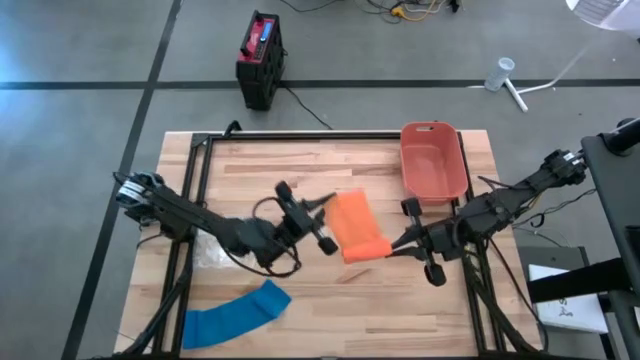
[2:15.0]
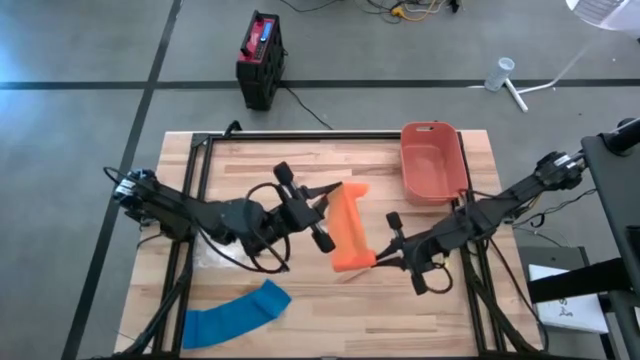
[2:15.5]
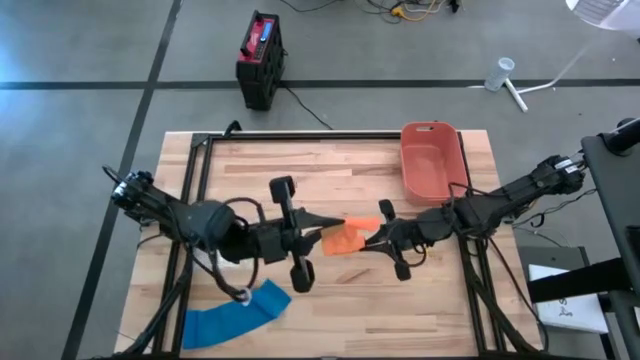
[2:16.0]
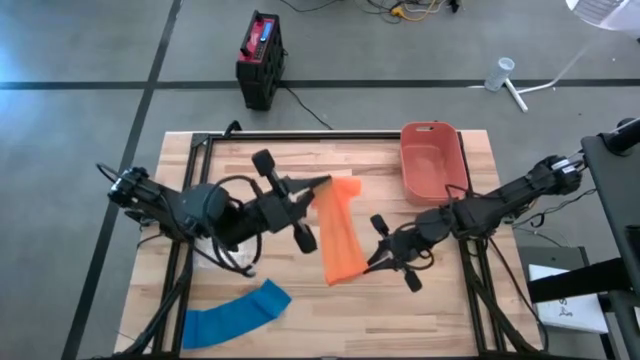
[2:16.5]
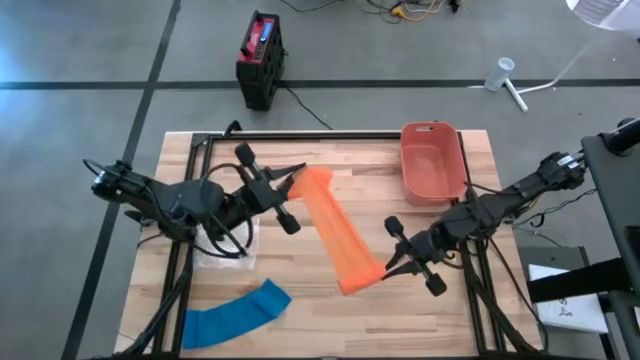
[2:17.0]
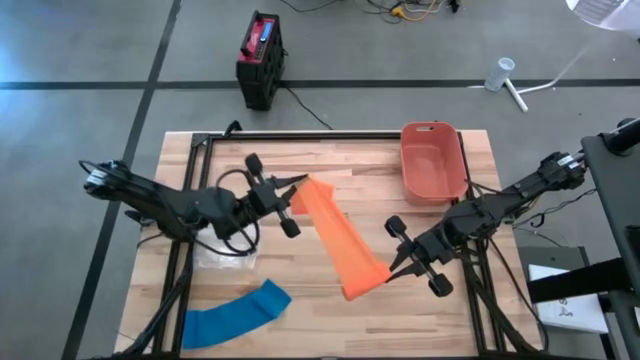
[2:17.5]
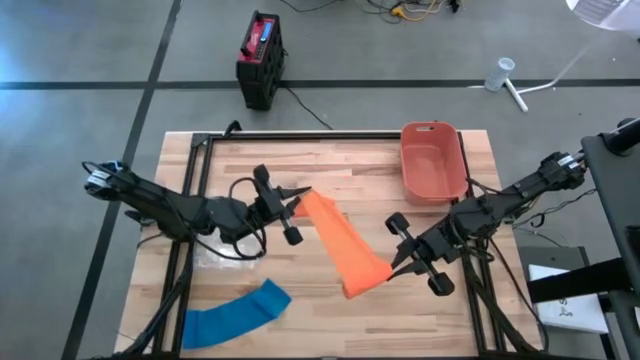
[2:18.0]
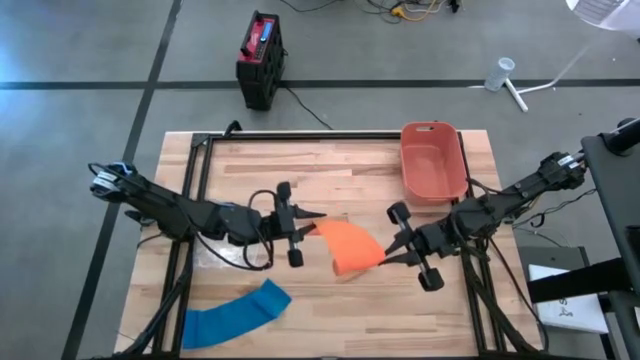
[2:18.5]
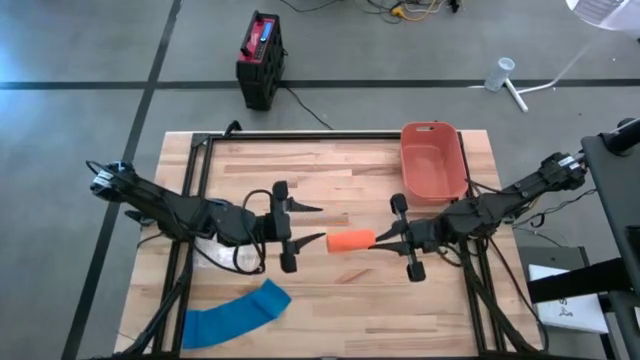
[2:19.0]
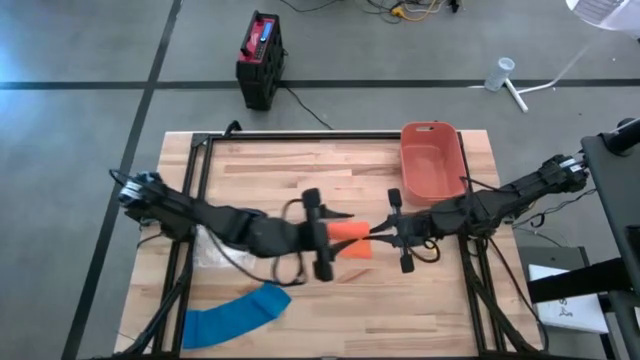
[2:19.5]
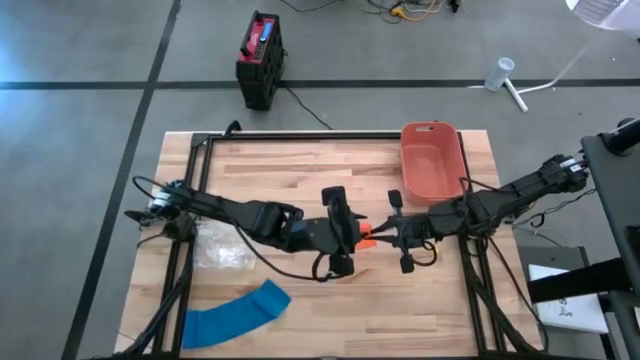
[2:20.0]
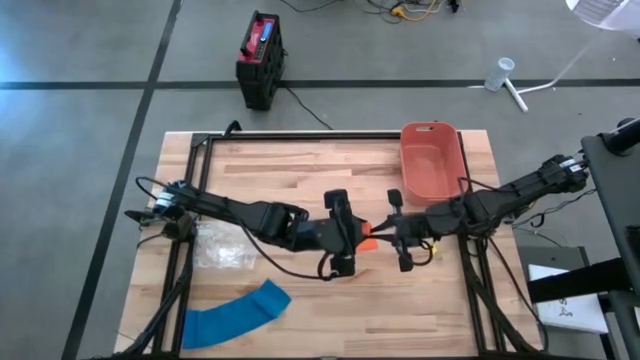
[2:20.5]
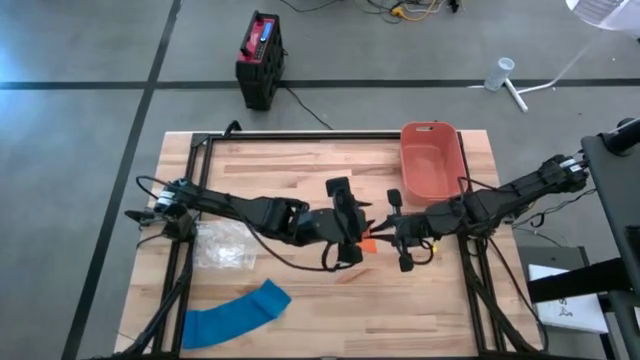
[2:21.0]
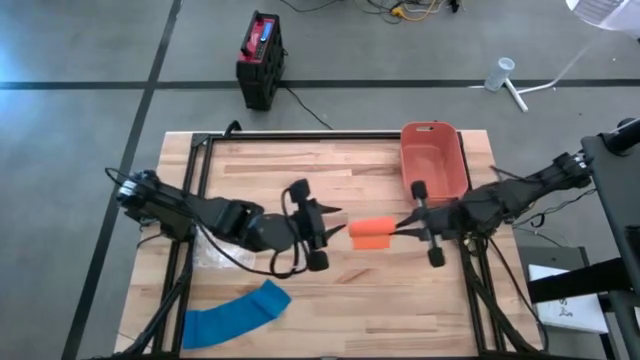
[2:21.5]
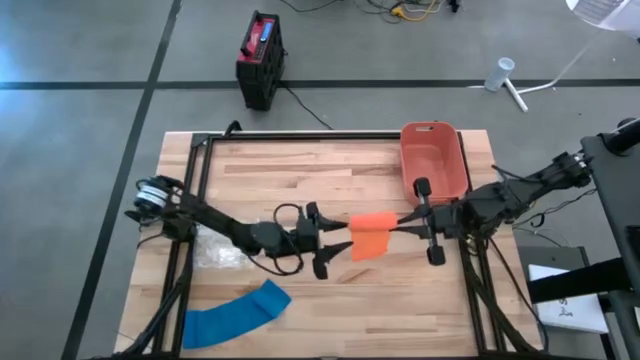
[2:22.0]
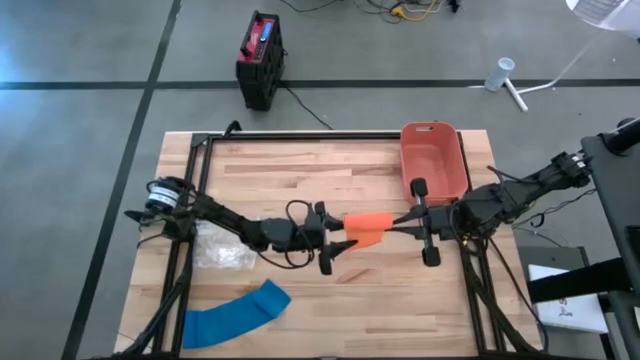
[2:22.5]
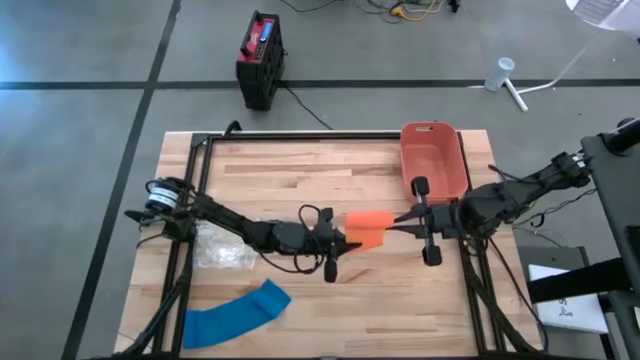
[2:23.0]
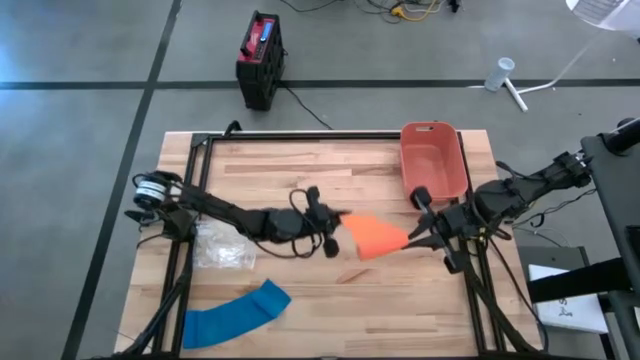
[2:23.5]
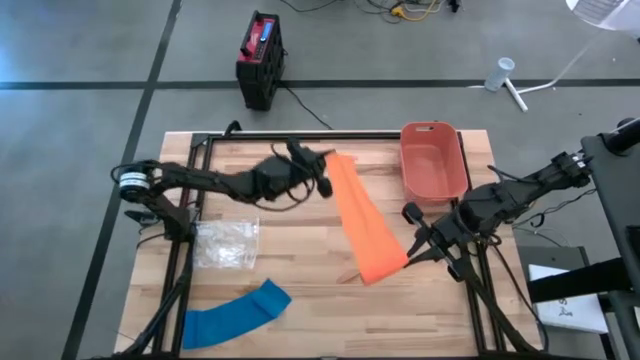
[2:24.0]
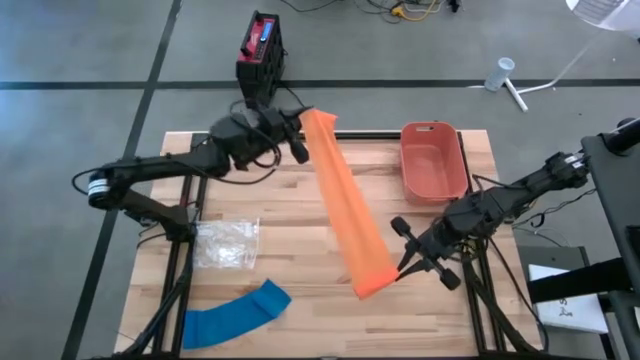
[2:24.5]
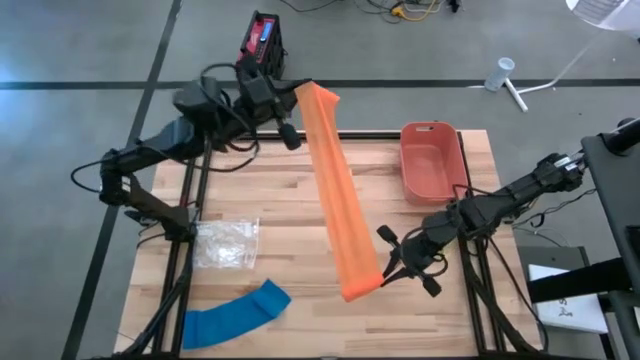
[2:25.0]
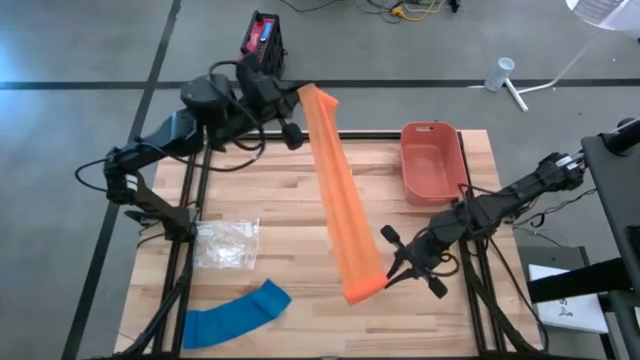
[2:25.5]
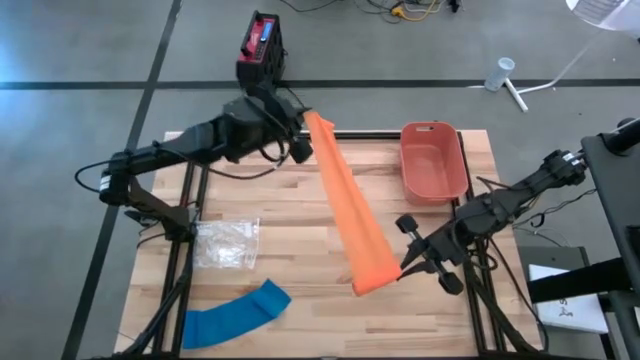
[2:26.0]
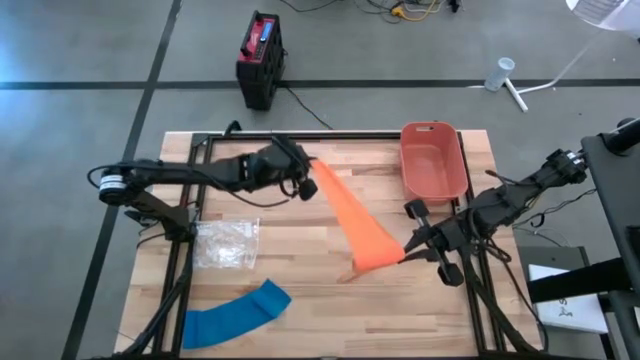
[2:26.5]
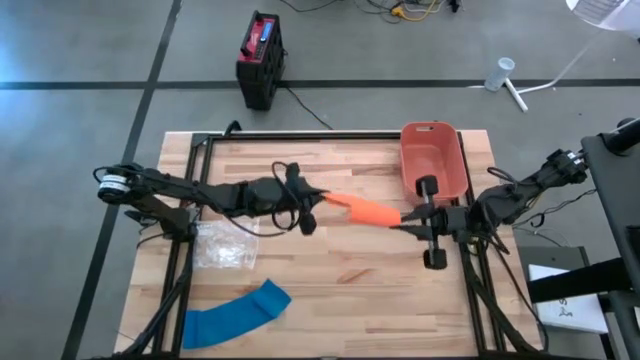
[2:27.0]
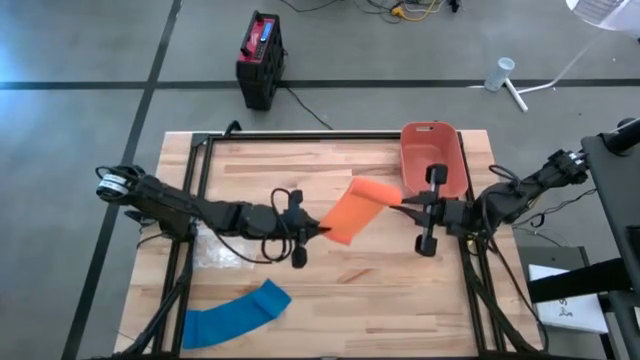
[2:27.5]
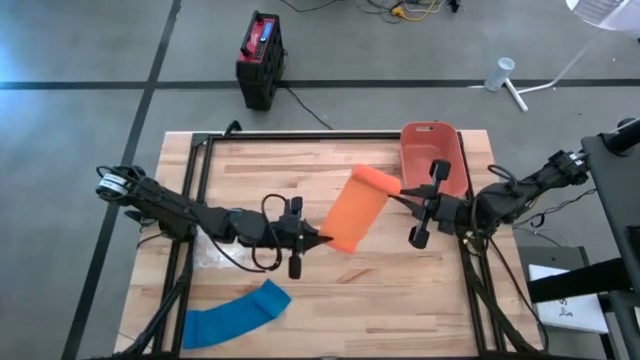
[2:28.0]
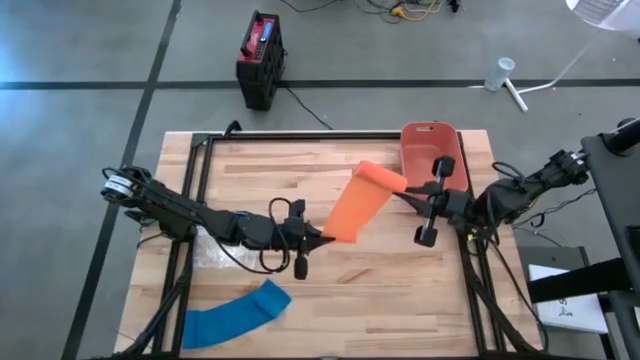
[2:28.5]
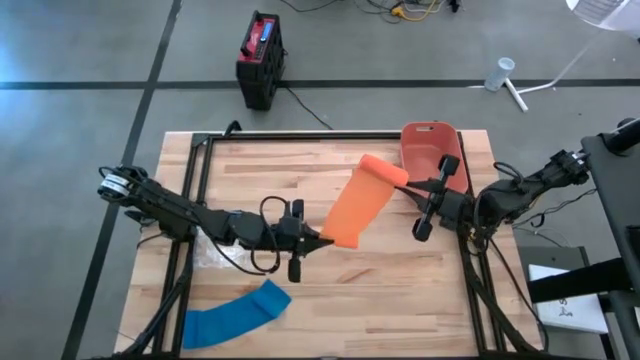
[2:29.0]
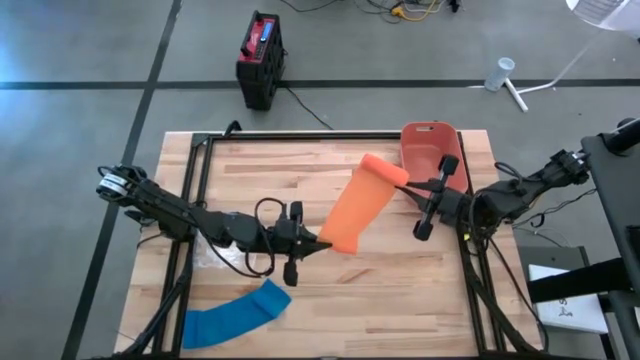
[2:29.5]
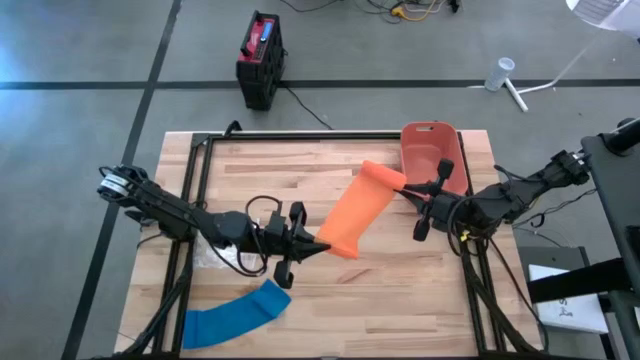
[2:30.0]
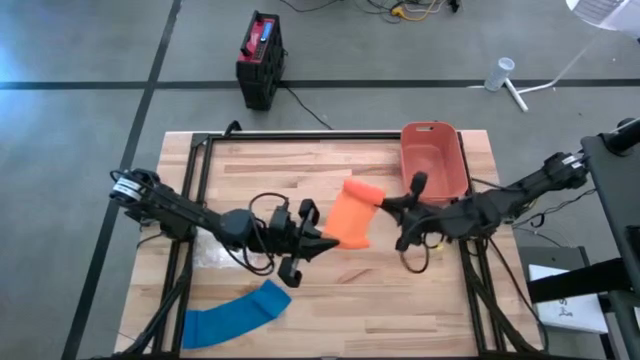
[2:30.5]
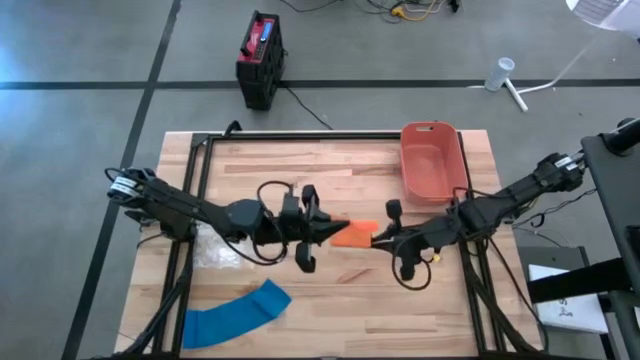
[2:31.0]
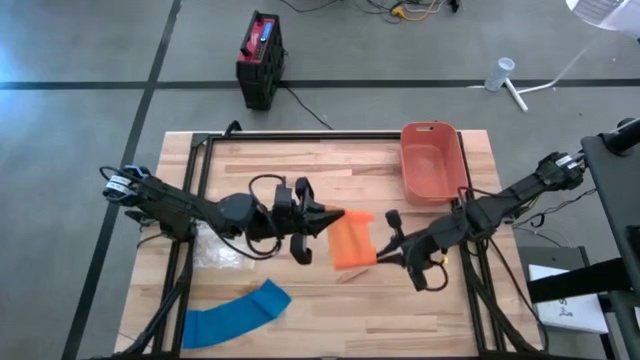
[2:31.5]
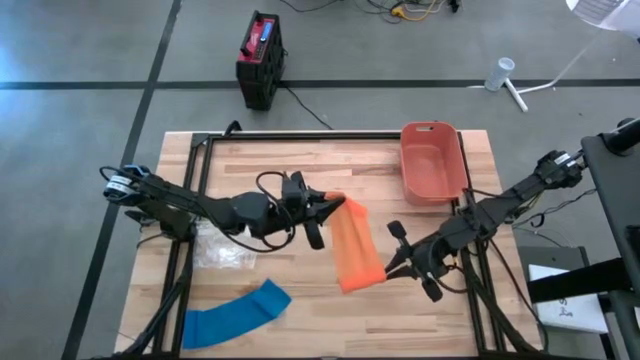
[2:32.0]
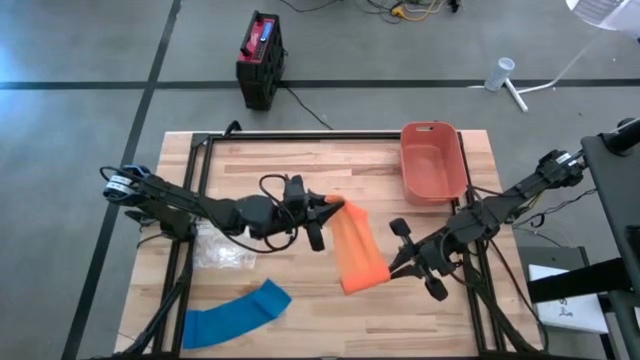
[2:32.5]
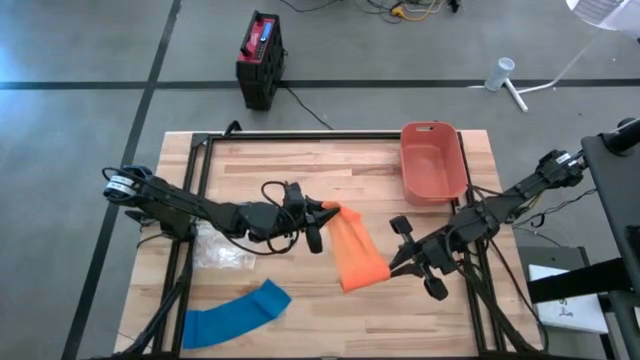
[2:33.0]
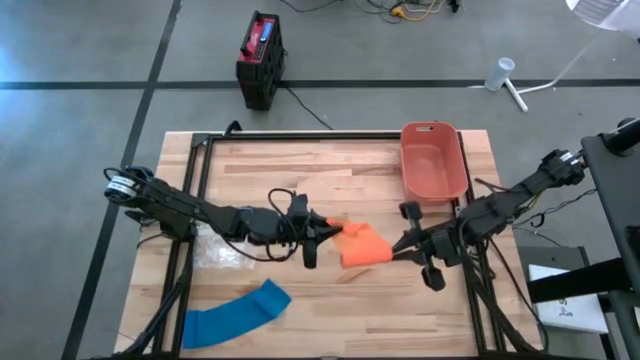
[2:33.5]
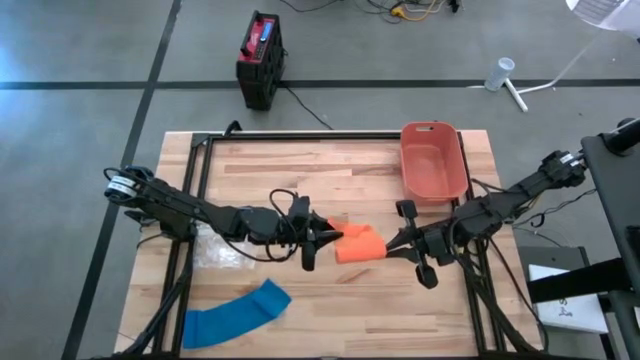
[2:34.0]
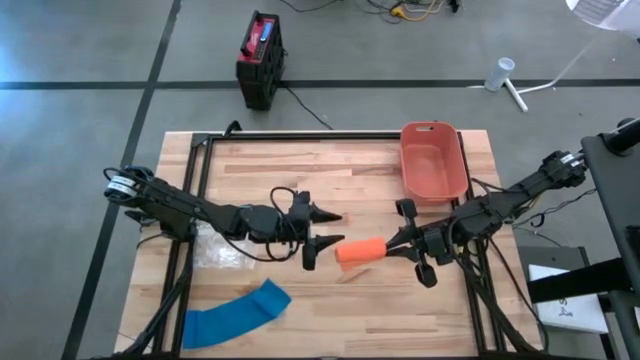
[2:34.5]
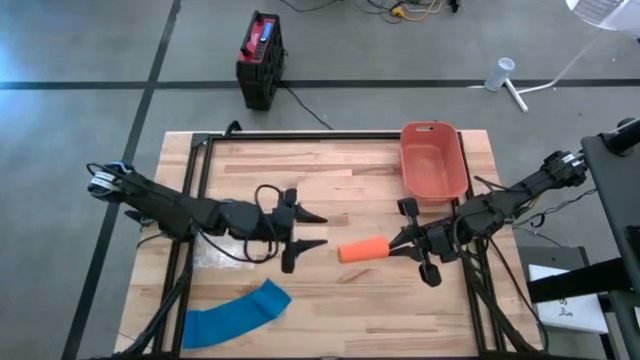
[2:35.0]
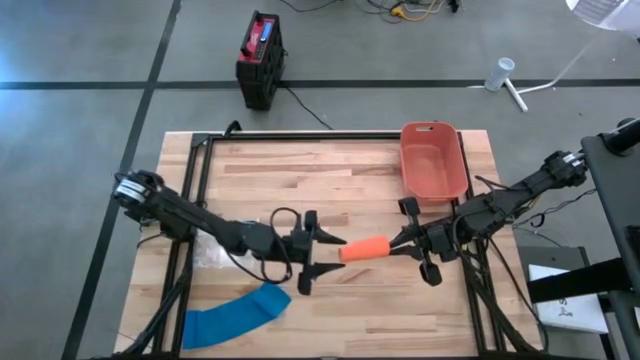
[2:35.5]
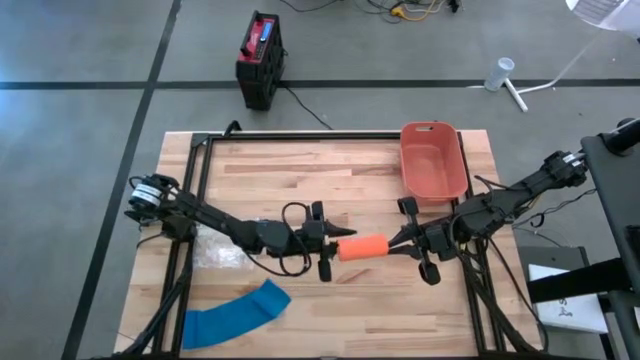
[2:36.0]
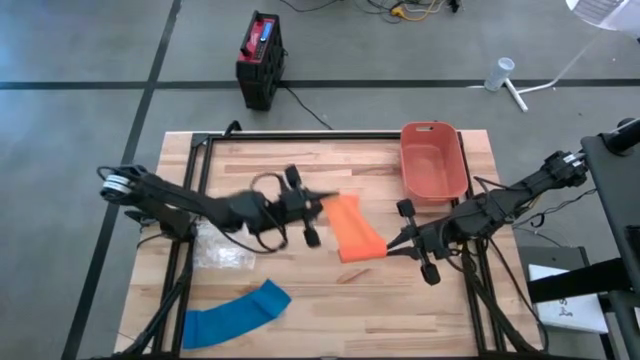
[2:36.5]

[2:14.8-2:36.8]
Task: Roll bandage
Roll the orange bandage
